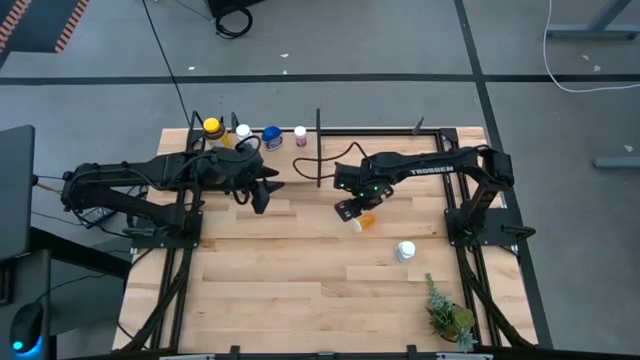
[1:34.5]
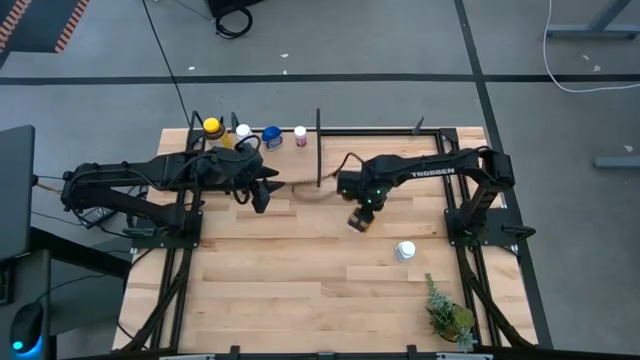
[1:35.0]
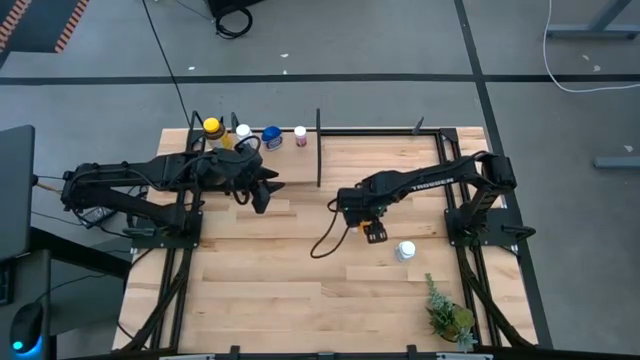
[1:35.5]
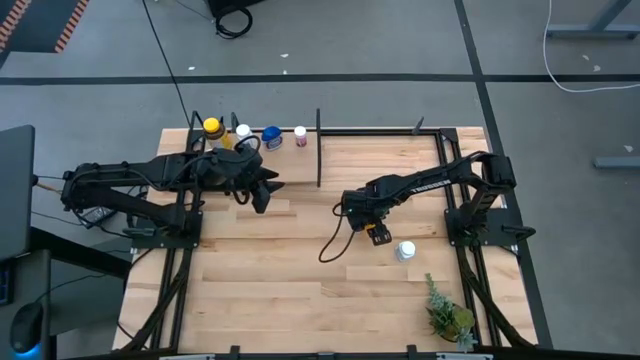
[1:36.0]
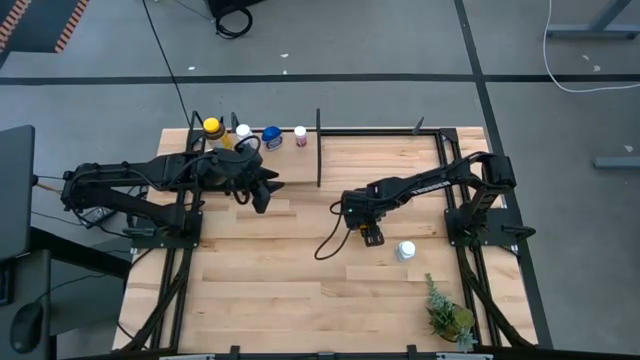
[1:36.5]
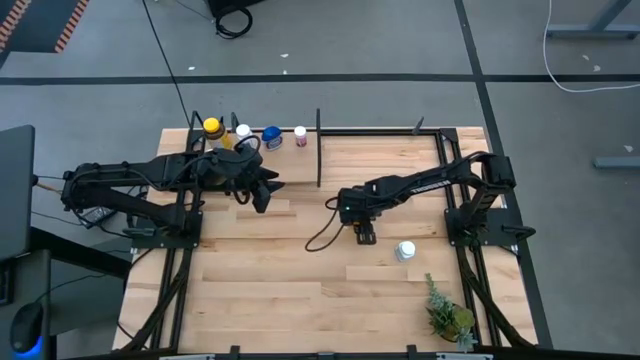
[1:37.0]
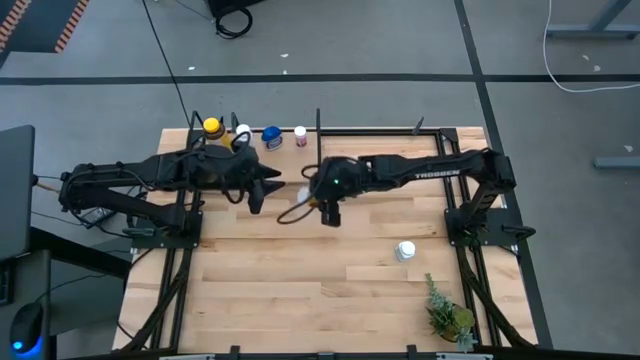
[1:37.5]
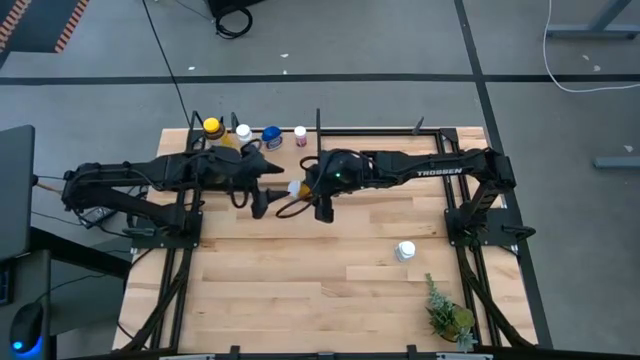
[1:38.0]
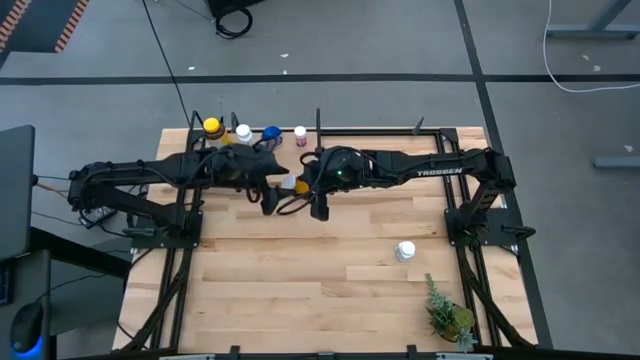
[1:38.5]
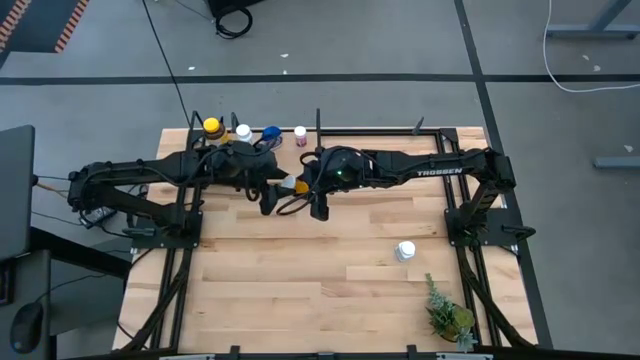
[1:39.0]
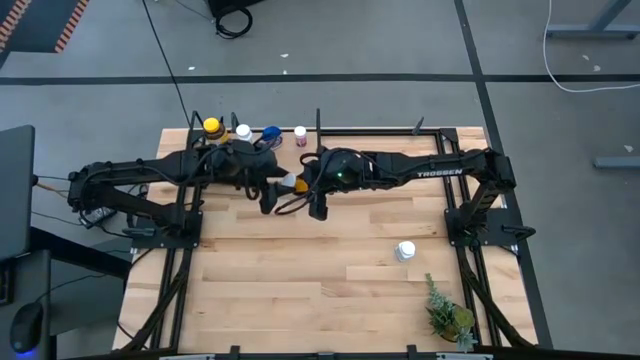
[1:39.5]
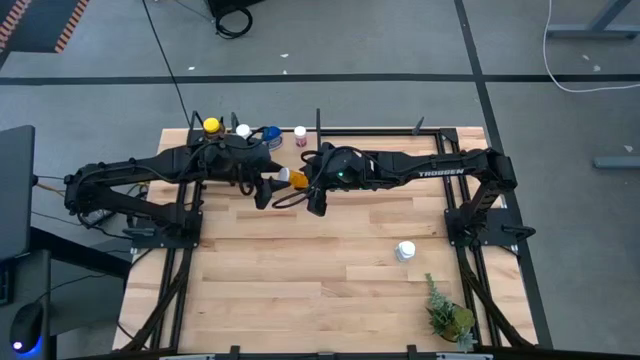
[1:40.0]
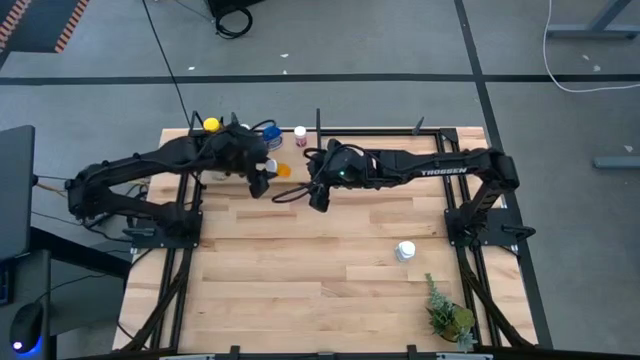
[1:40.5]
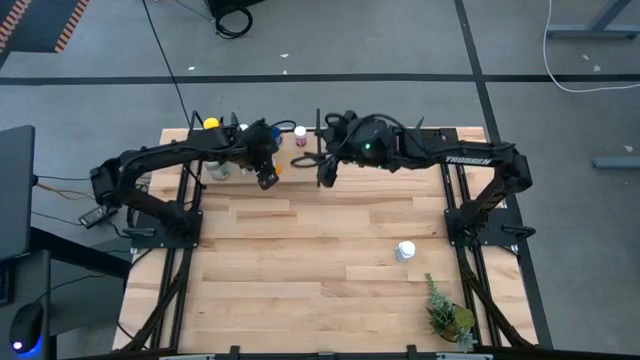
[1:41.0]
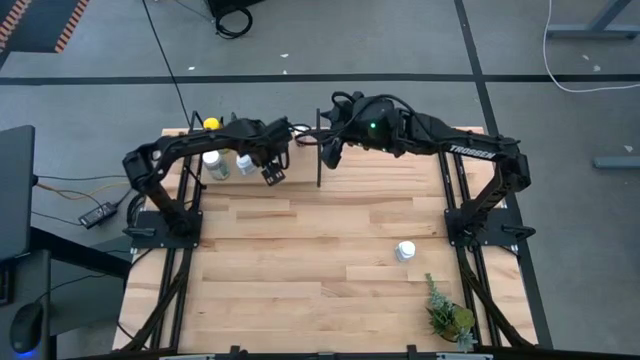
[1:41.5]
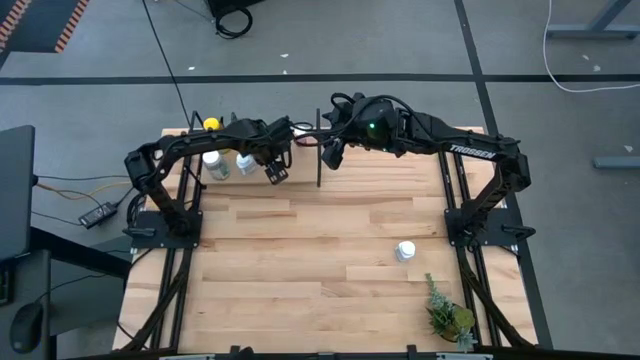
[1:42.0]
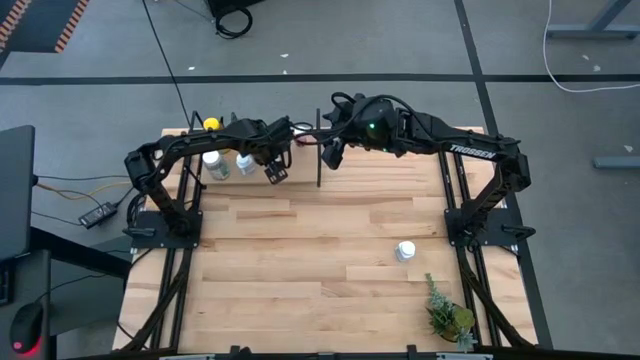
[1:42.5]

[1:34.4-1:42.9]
Task: Pick and place medicine bottles onto shelf by color
Put the orange medicine bottle on the shelf

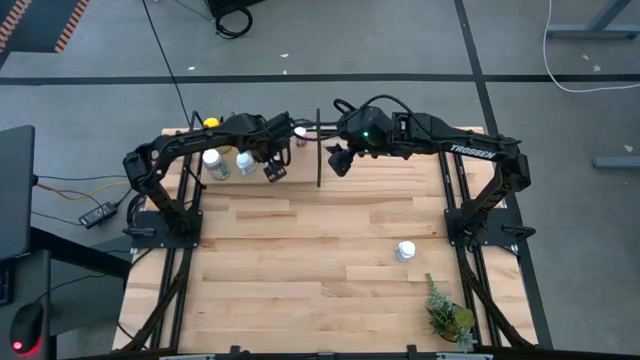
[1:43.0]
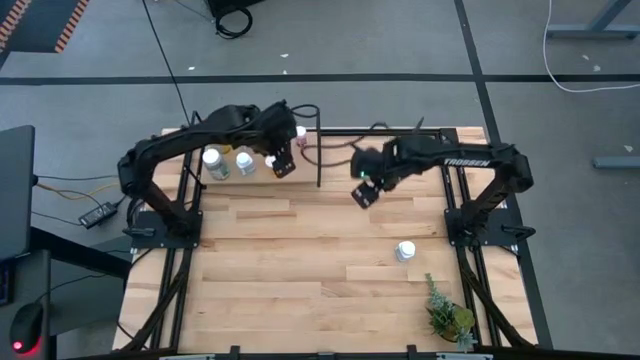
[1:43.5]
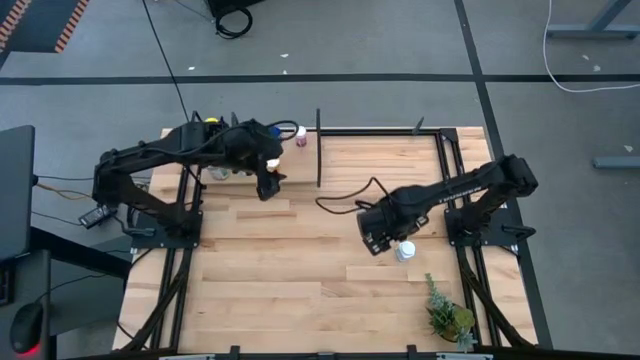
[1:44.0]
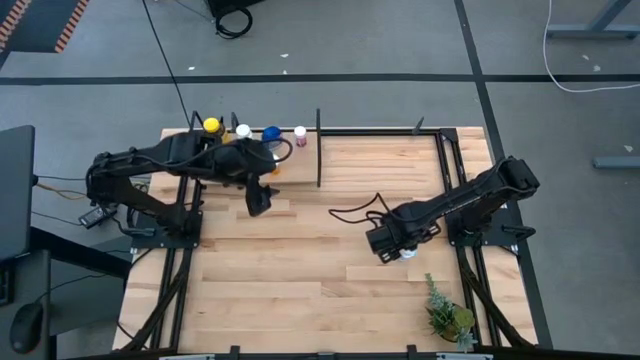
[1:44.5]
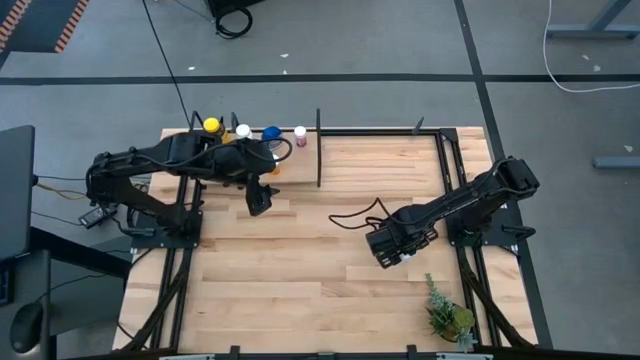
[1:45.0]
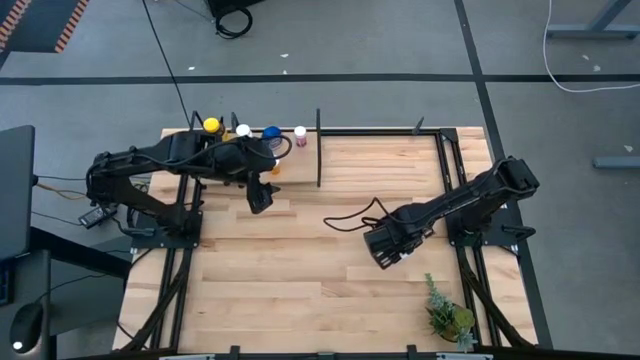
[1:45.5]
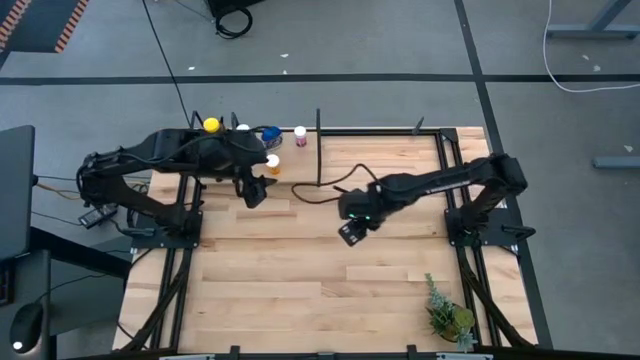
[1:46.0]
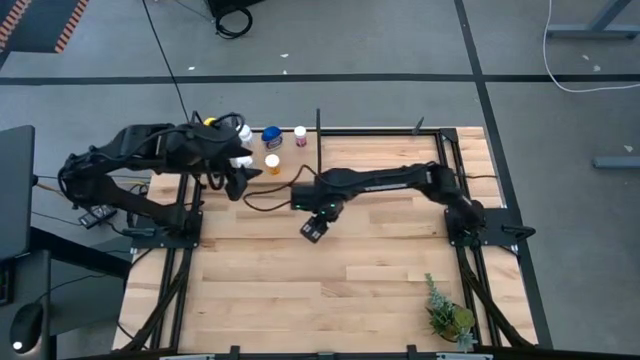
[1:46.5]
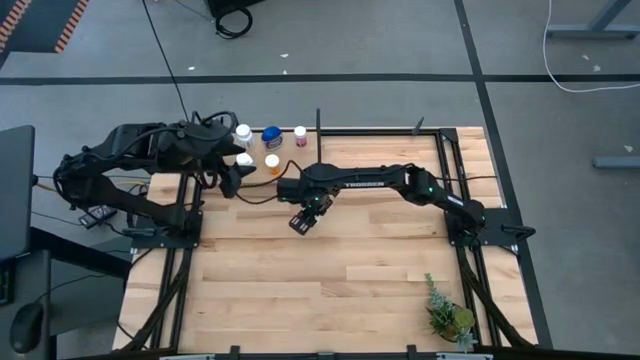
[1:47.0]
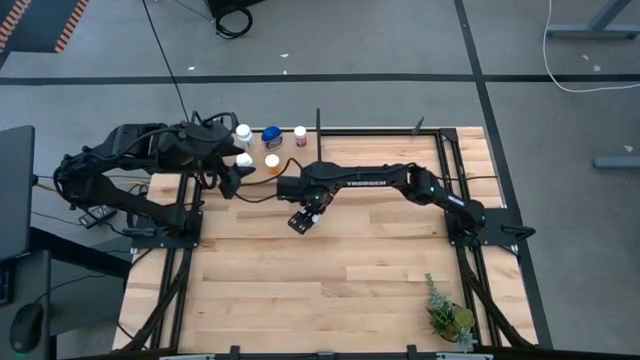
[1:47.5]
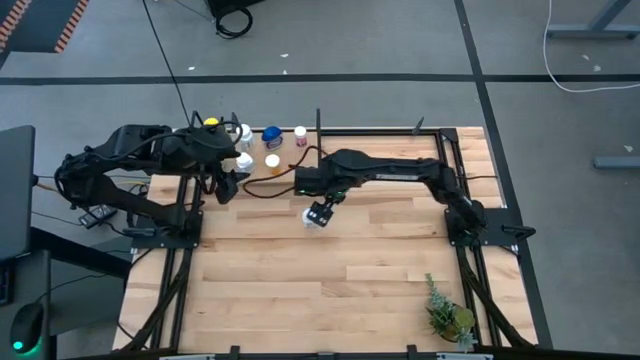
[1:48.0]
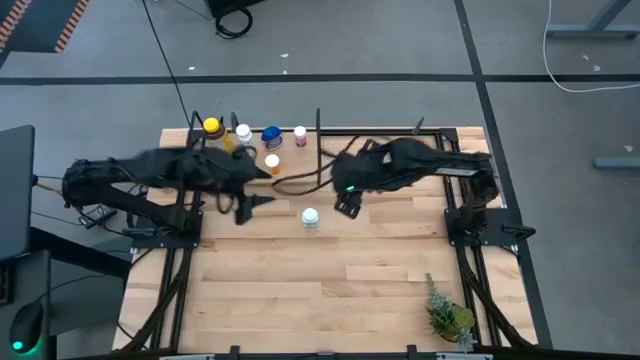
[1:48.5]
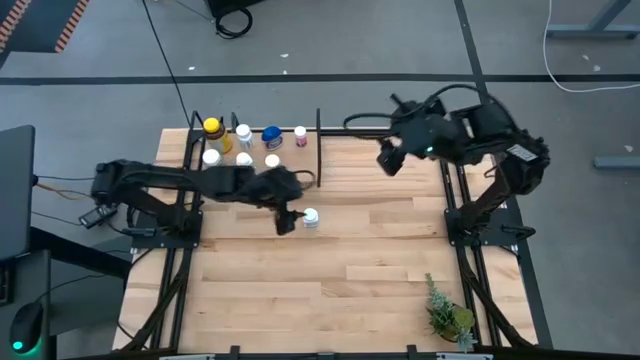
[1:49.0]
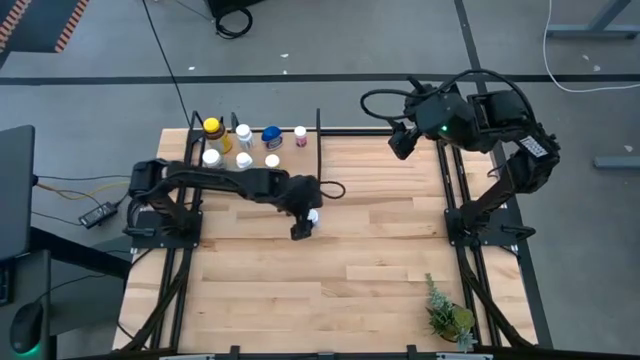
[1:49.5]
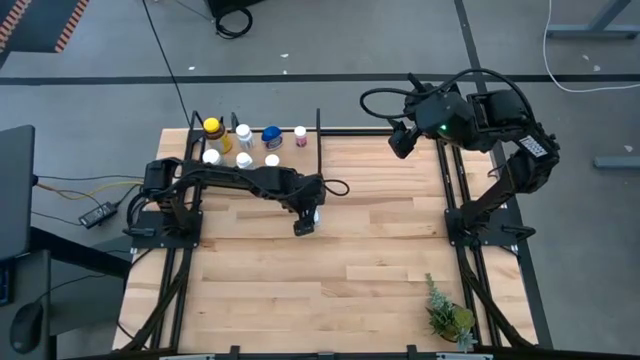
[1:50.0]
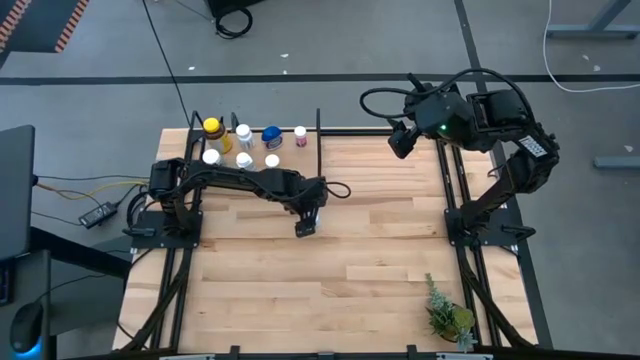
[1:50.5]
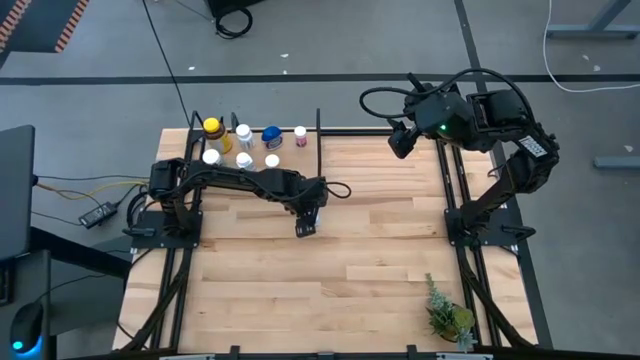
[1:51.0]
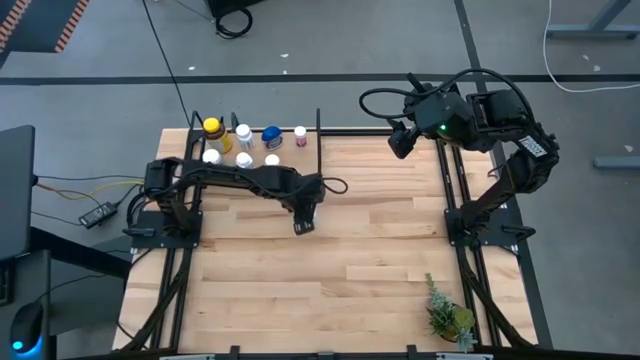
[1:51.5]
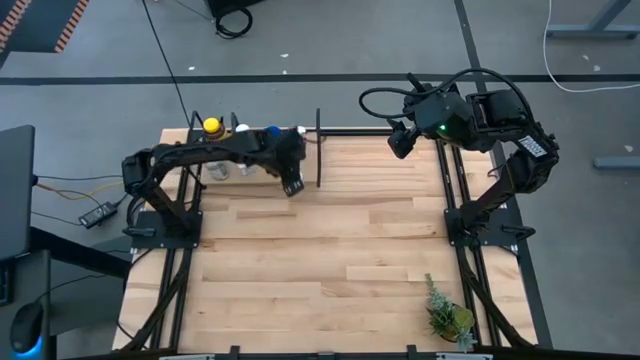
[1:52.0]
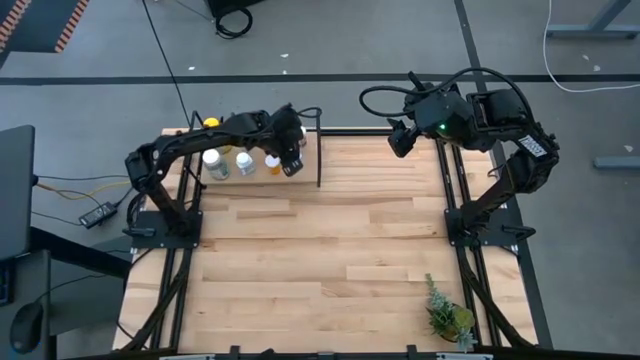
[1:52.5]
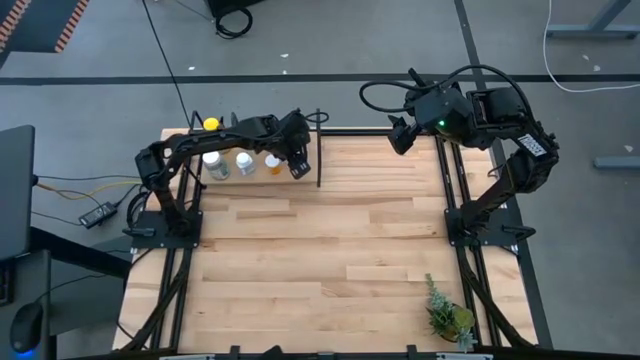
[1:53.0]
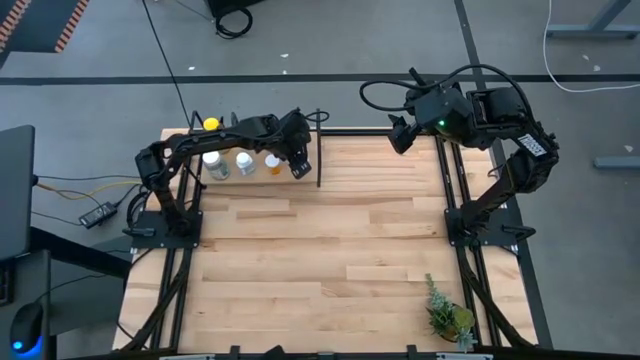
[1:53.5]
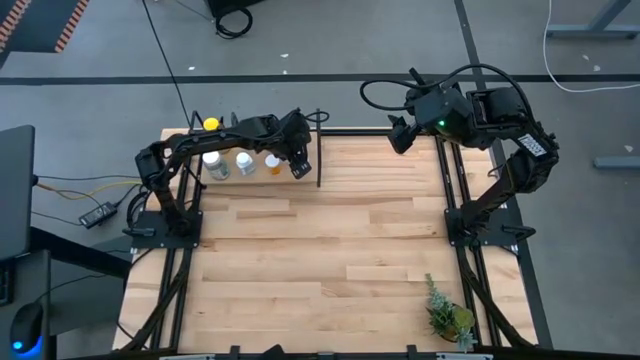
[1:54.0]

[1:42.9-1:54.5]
Put the white and blue medicine bottle on the shelf
